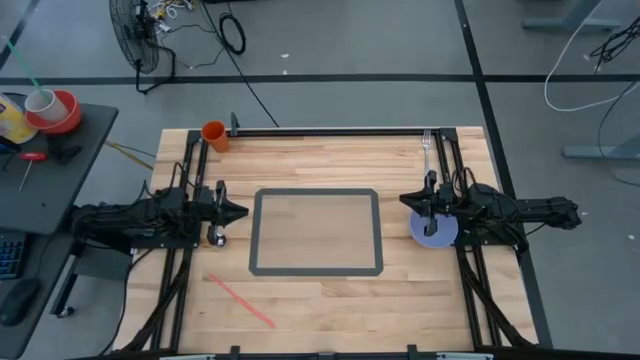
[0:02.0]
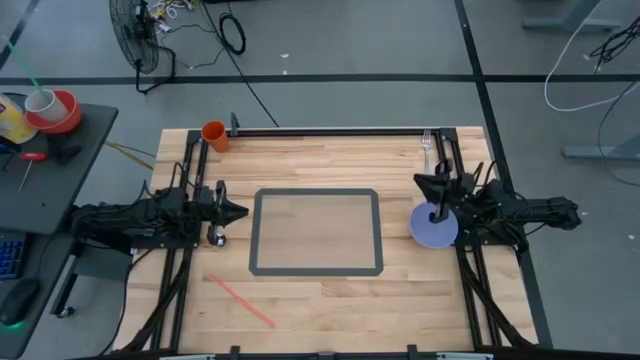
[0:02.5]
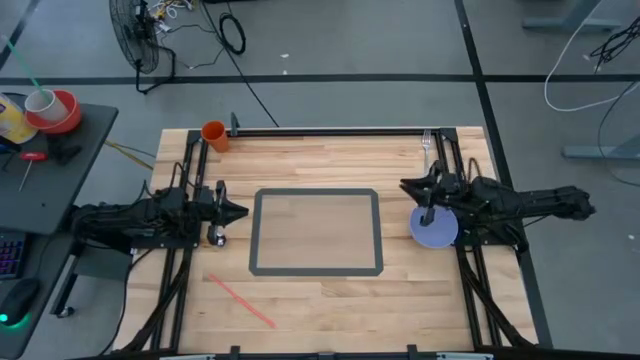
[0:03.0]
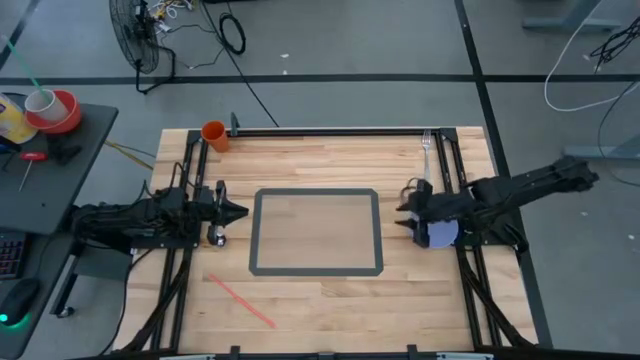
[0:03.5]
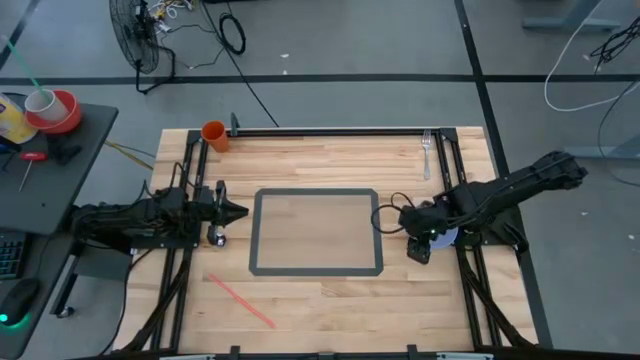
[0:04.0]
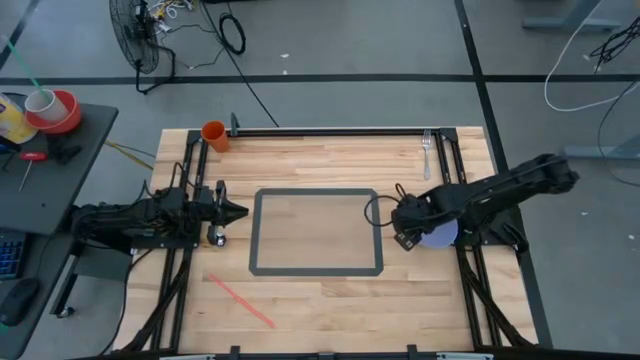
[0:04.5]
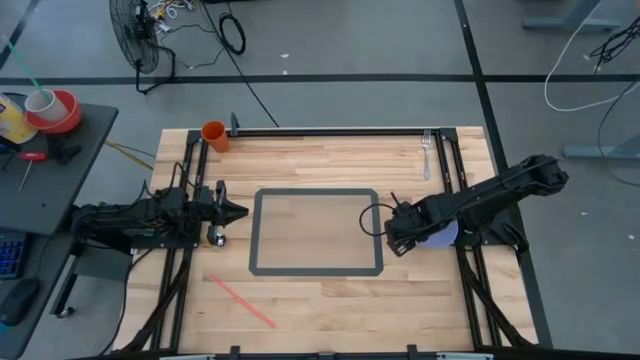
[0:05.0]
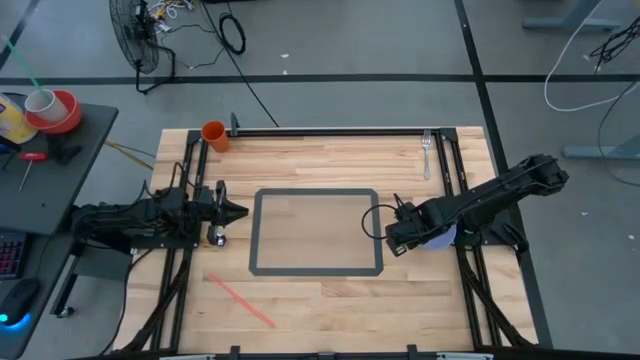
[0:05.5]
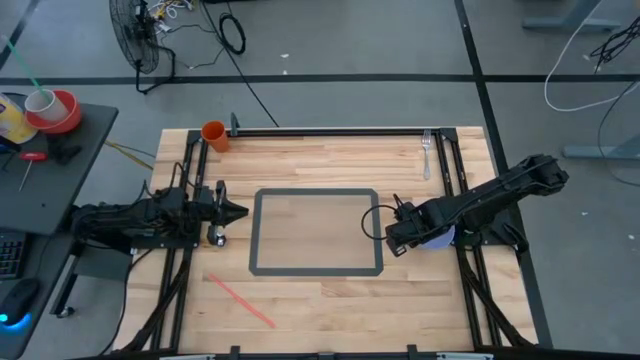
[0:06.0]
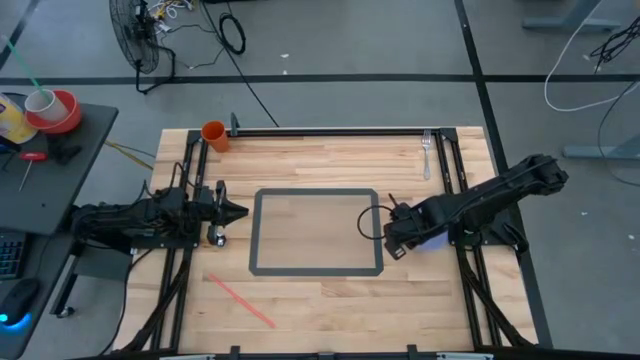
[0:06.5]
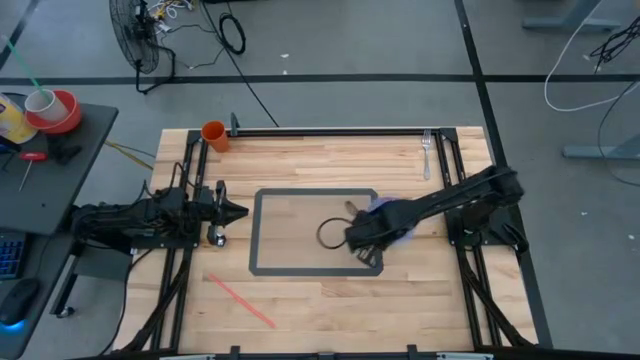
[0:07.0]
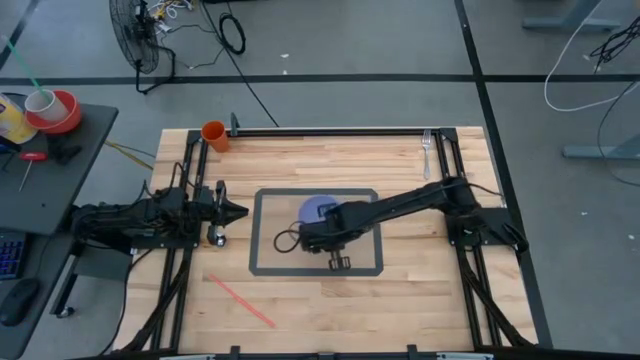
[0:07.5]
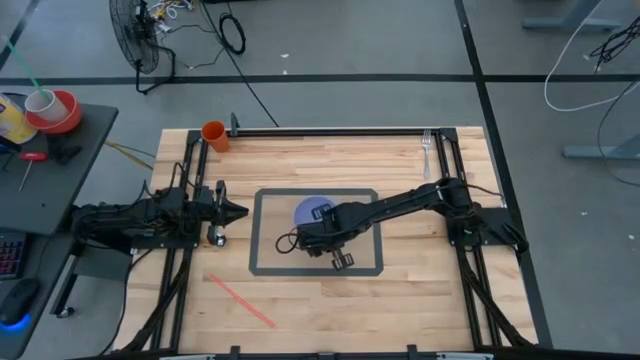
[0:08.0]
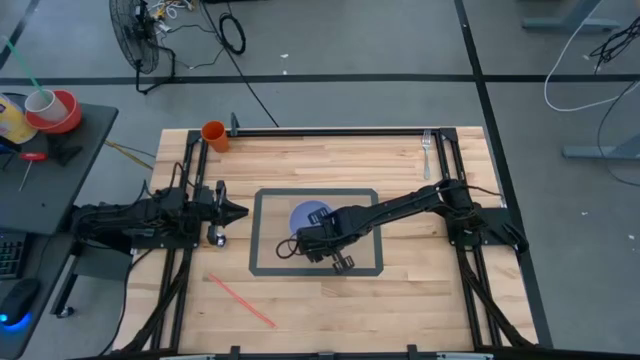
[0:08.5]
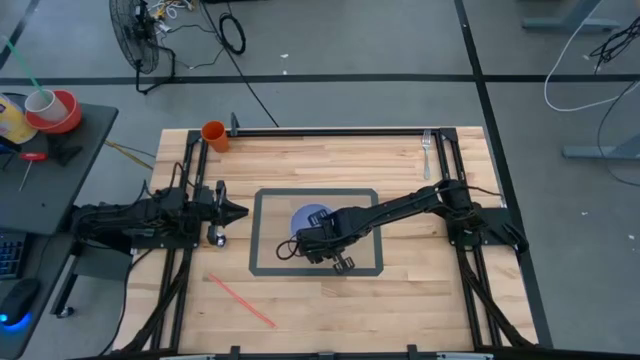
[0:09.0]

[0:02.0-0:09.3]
Task: Pick & Place Utensil
Put the purple bowl in the center of the mat

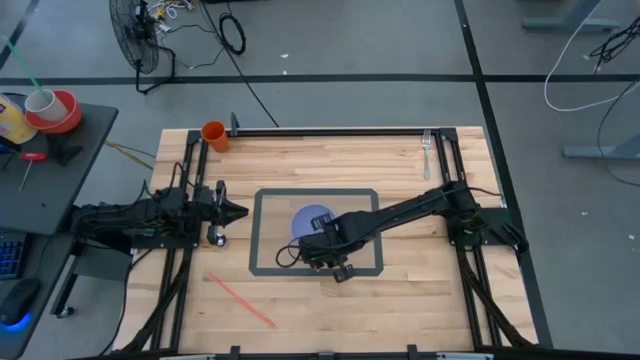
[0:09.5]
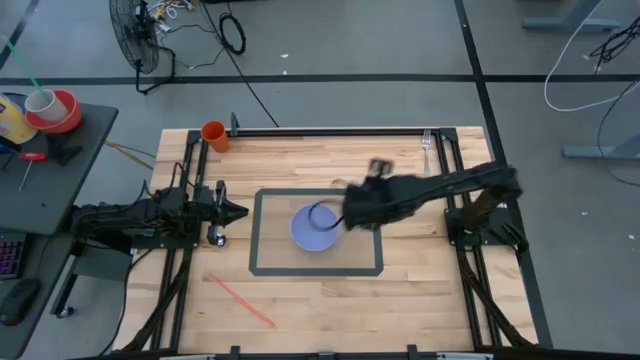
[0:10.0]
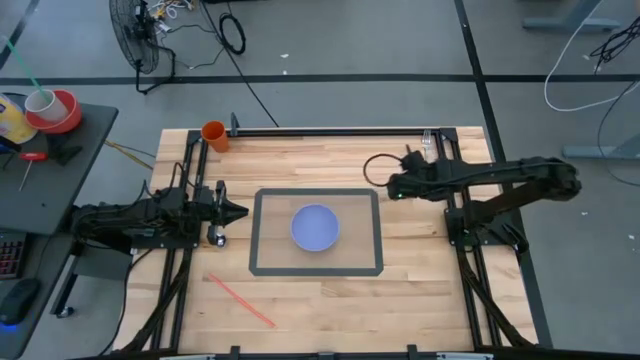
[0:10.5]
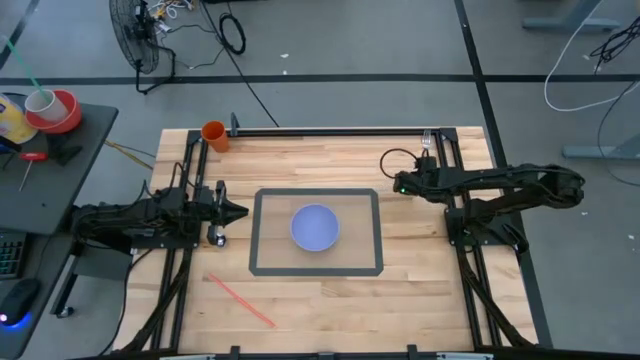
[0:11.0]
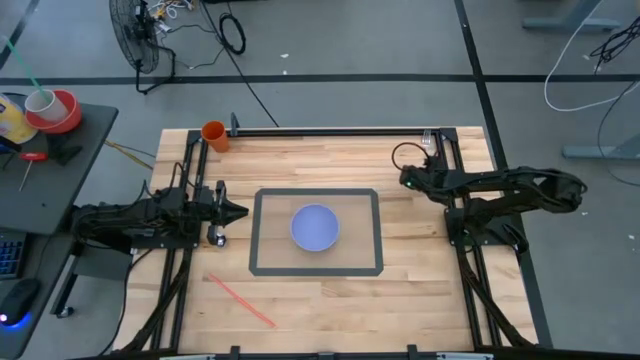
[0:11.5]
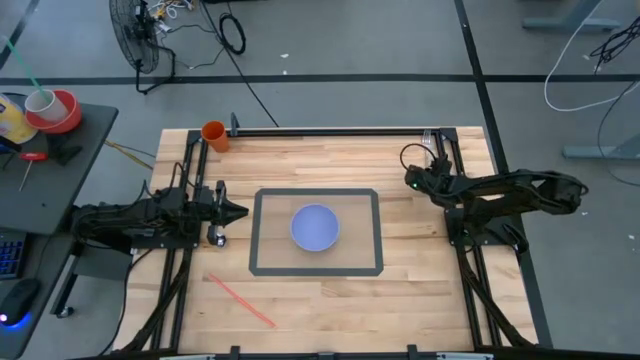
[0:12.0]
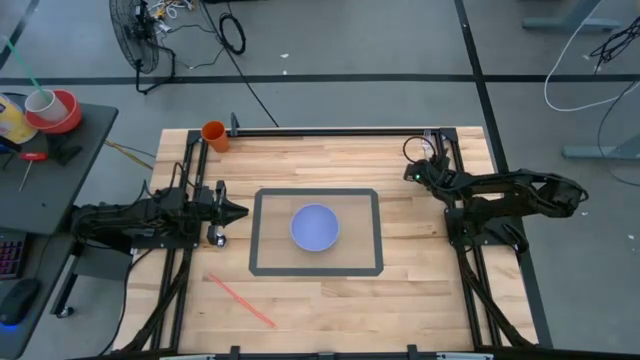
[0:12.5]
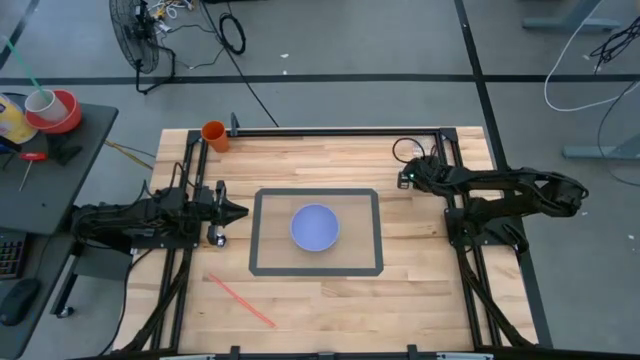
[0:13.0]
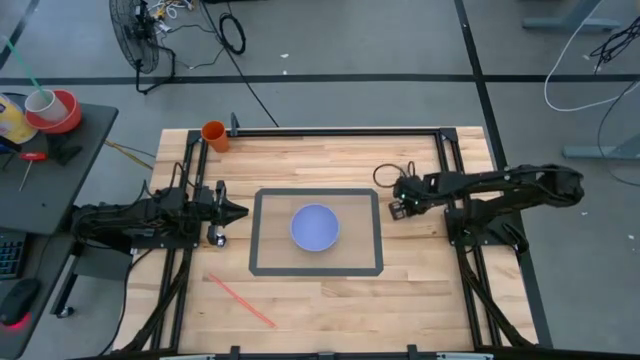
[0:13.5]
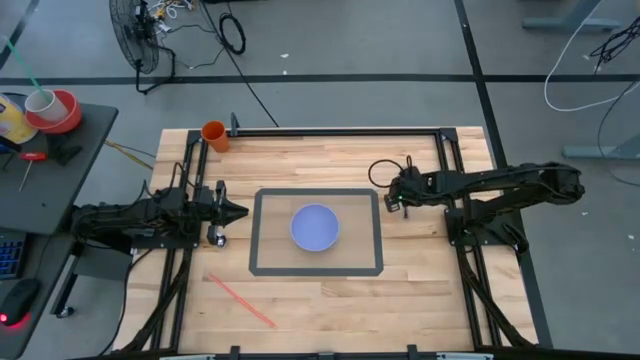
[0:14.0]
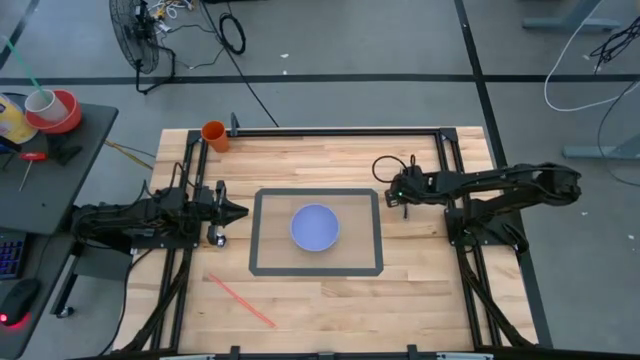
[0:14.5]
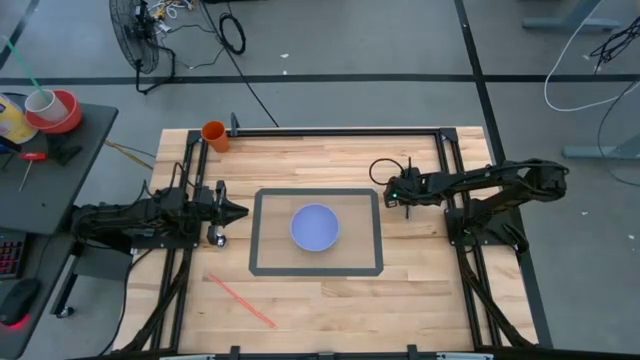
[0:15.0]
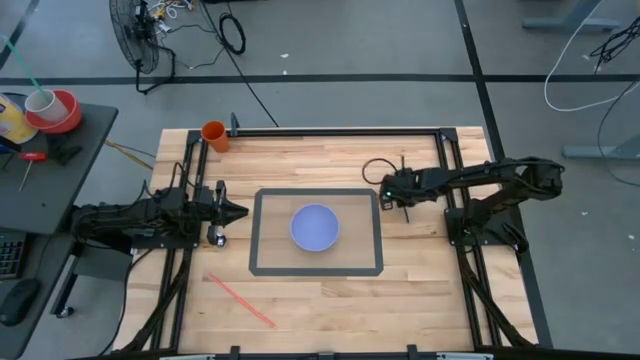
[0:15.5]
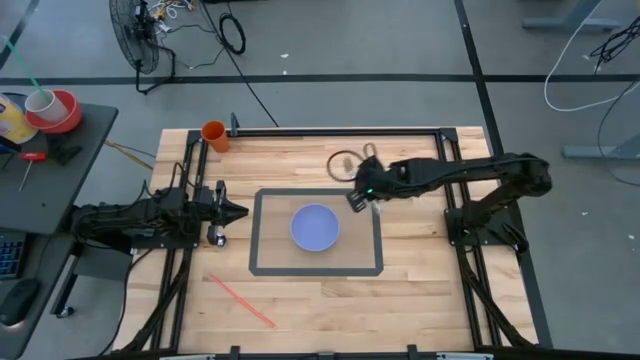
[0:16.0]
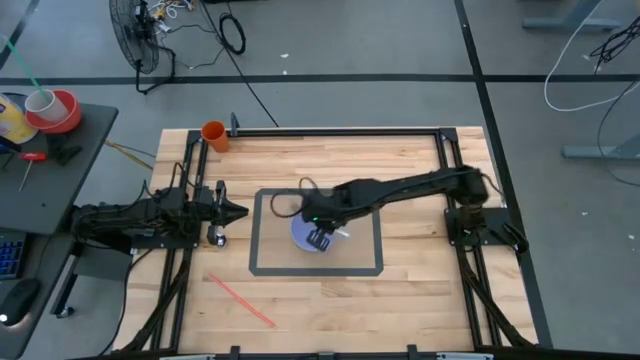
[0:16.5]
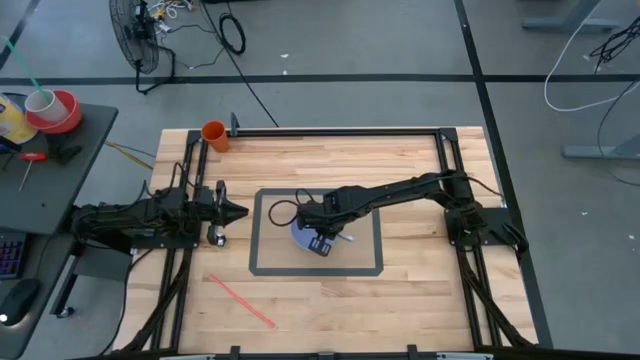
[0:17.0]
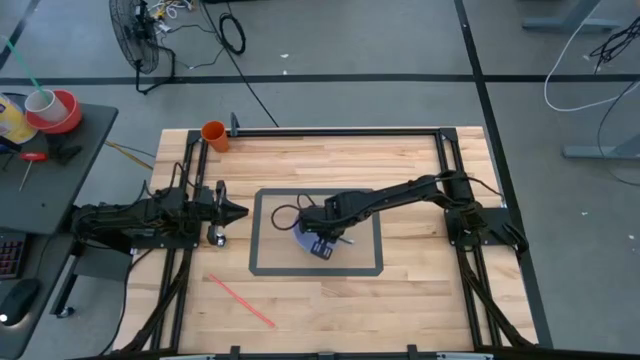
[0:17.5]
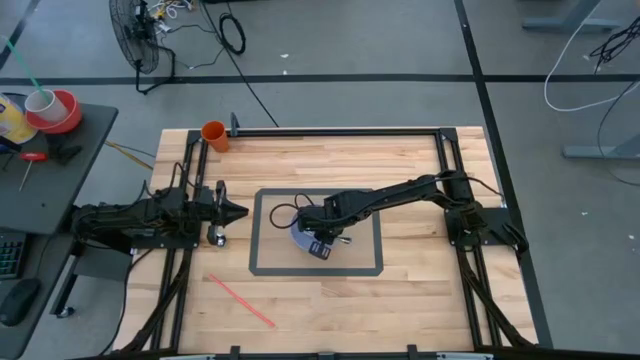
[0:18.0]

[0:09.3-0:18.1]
Put the silver fork into the purple bowl

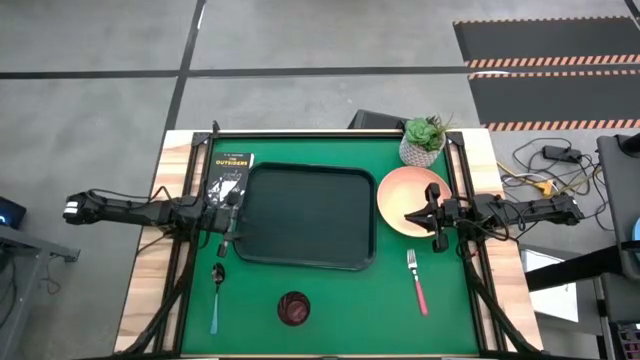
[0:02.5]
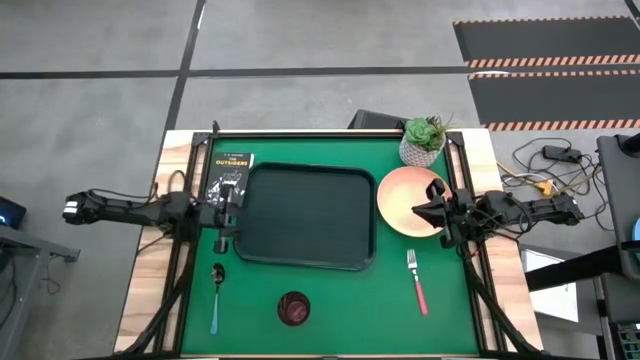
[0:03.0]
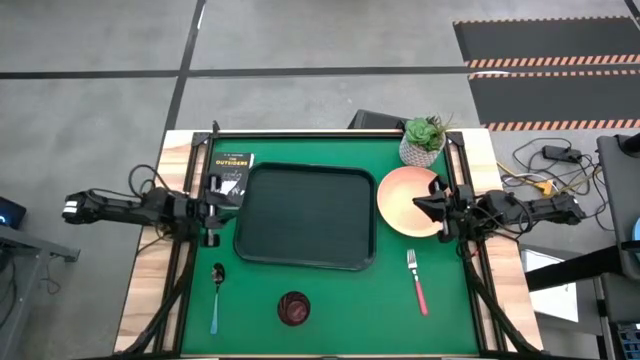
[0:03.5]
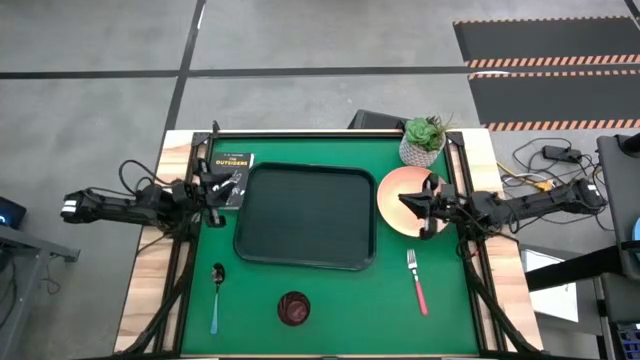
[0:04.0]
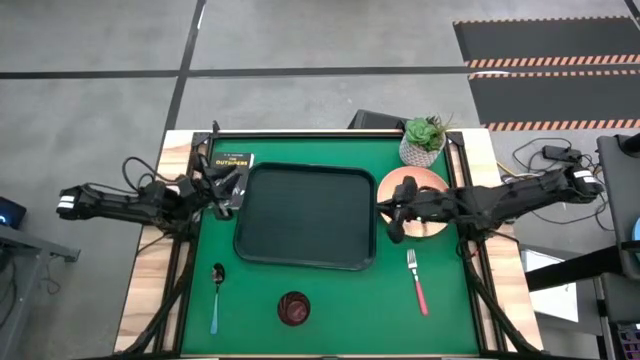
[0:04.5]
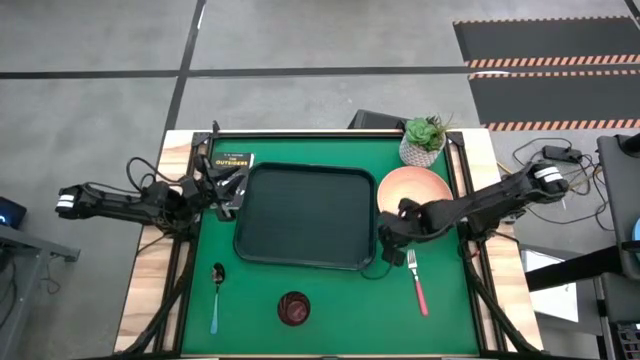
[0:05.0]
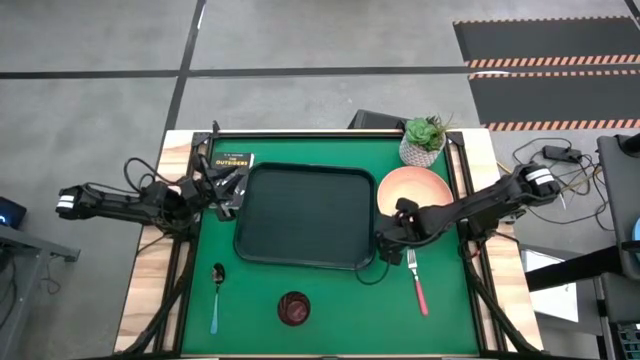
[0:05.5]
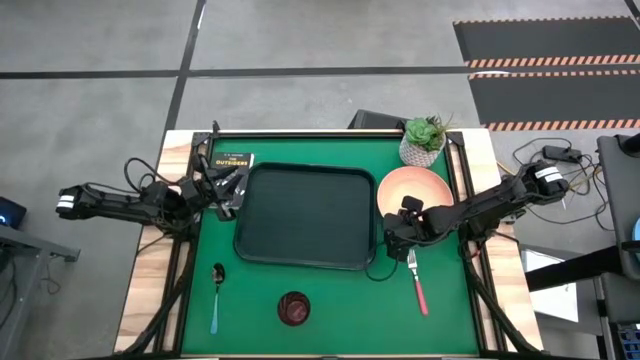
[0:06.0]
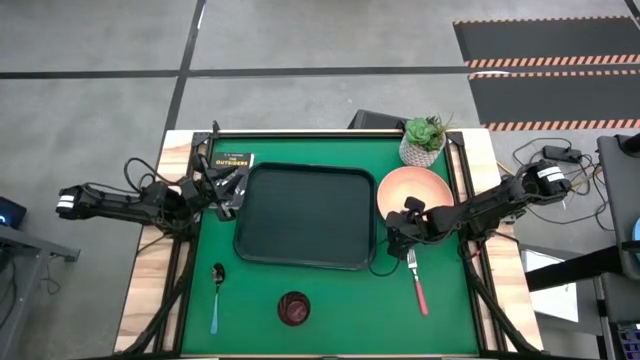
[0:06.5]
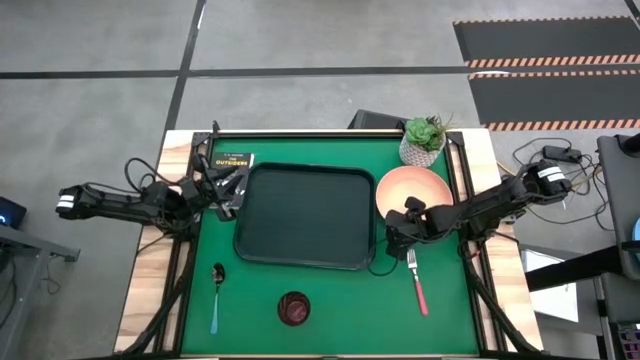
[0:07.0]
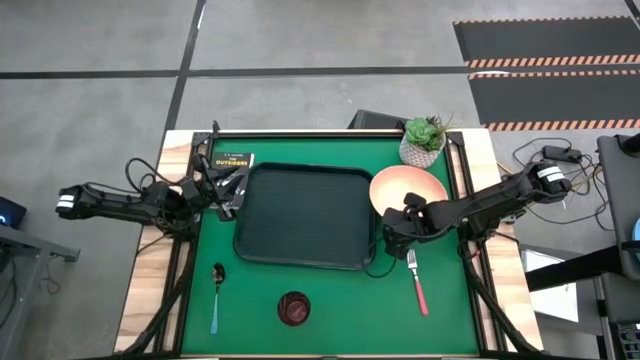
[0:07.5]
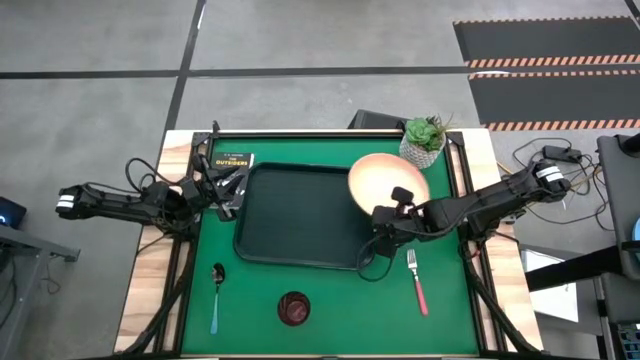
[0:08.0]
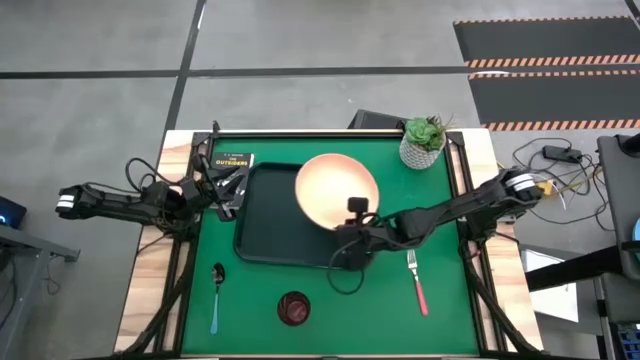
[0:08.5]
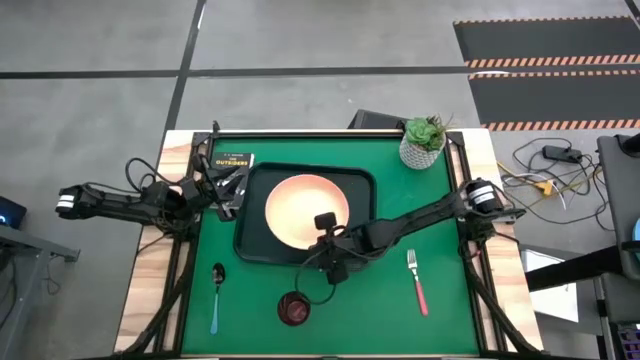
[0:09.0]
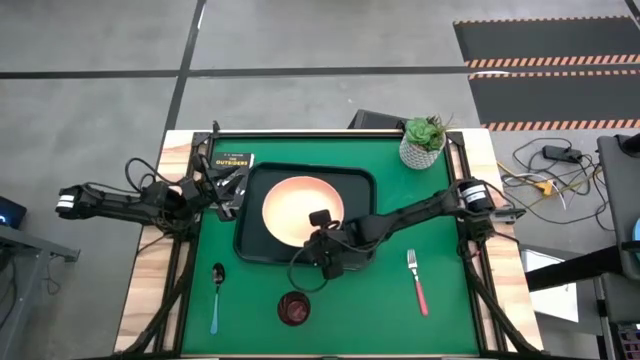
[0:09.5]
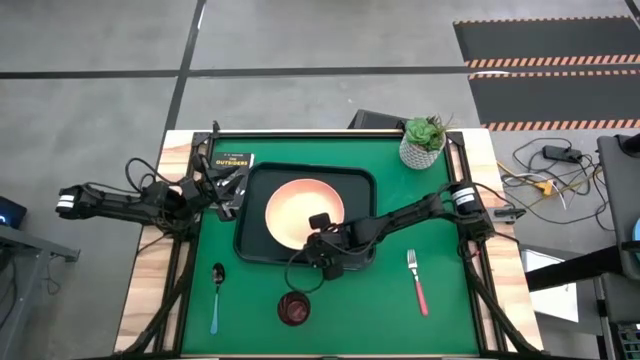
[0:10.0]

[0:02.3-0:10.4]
Task: Pick and place plate/cup/fork/spoon on tray
Put the orange plate on the black table tray
